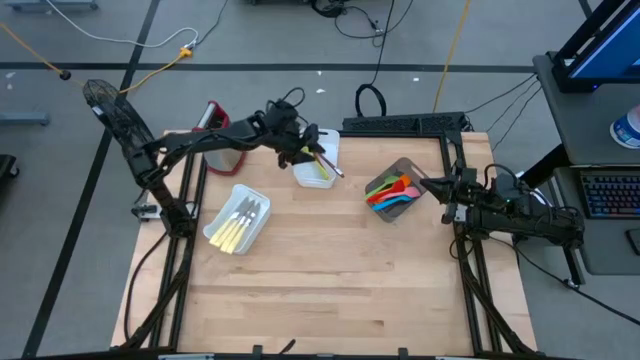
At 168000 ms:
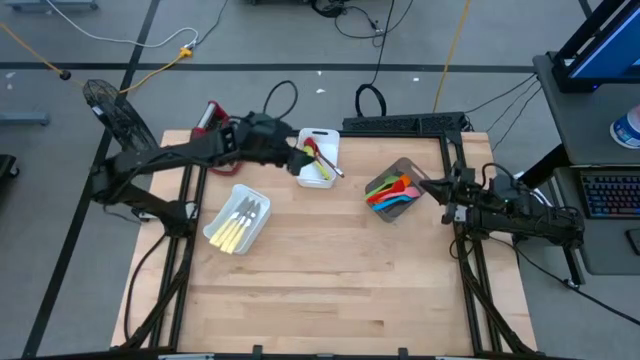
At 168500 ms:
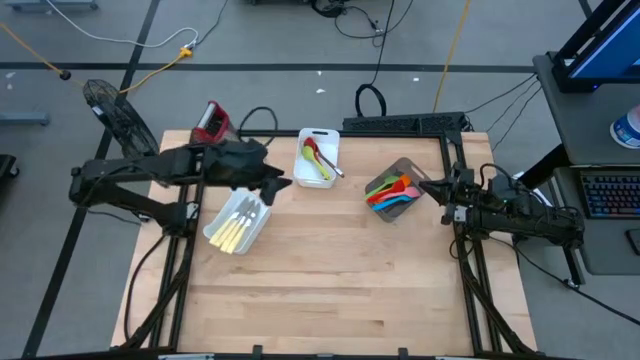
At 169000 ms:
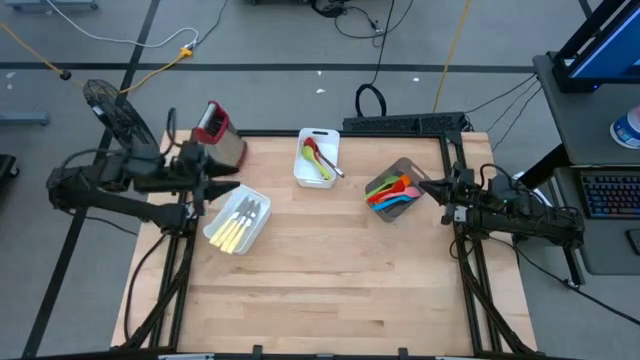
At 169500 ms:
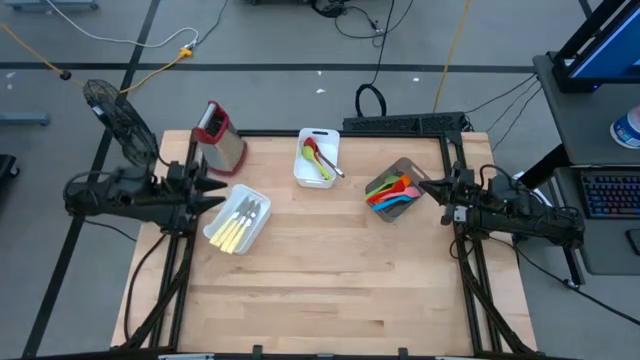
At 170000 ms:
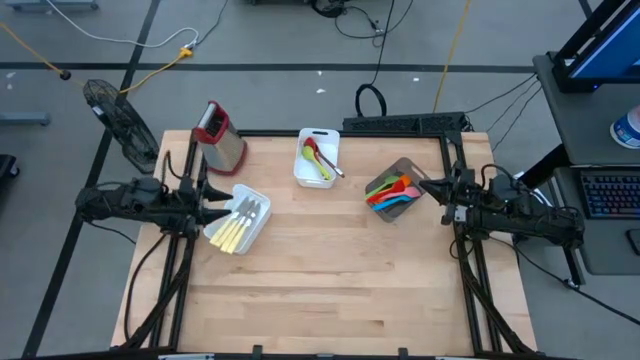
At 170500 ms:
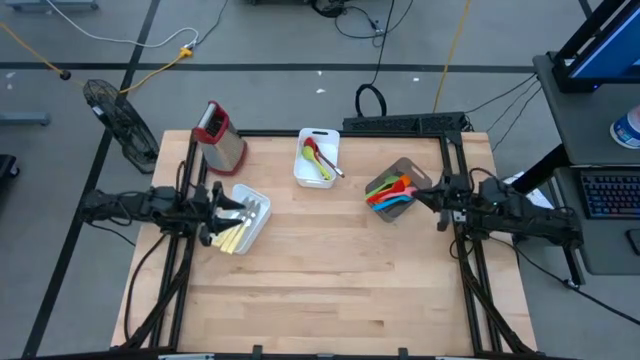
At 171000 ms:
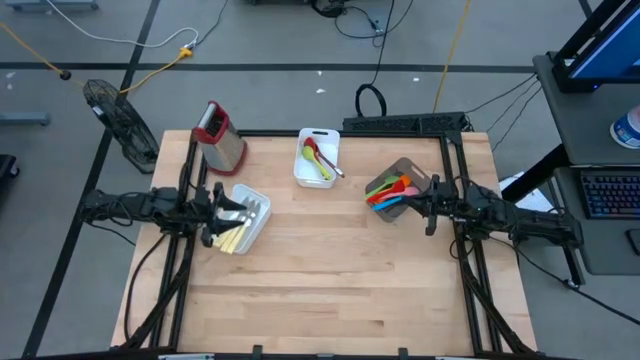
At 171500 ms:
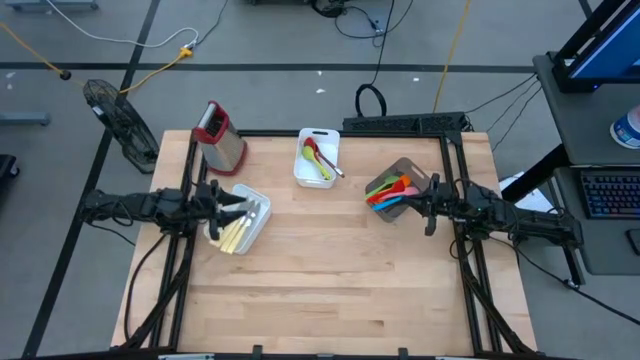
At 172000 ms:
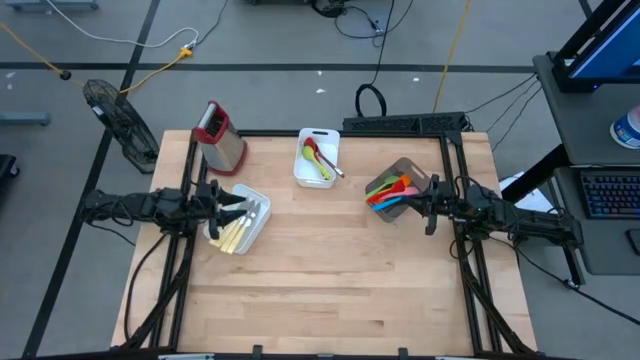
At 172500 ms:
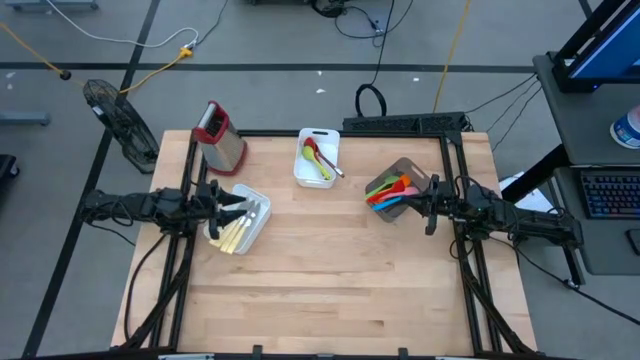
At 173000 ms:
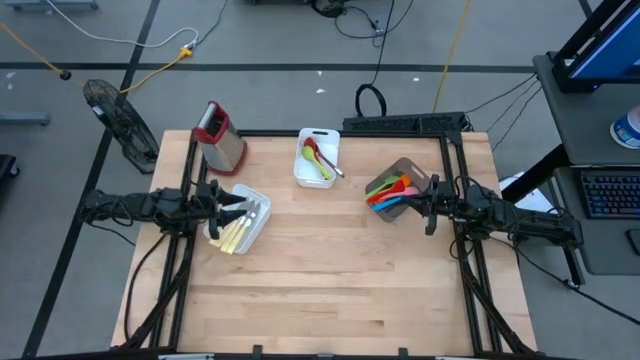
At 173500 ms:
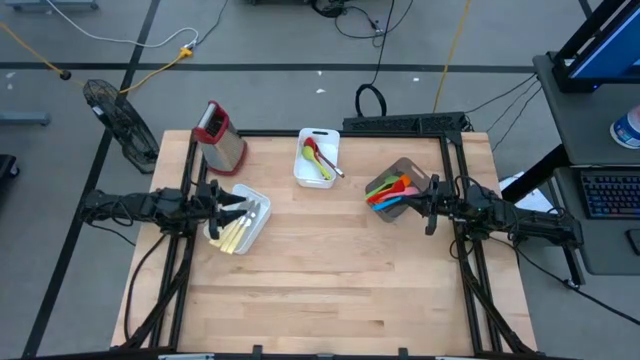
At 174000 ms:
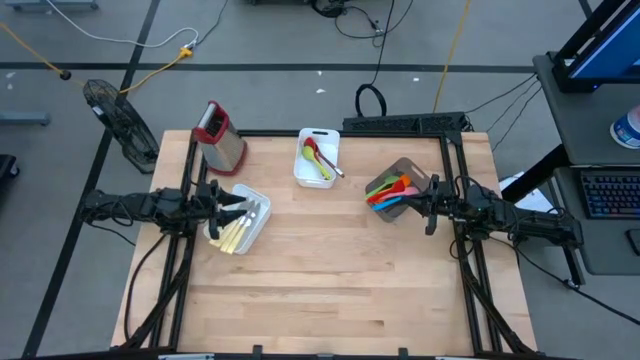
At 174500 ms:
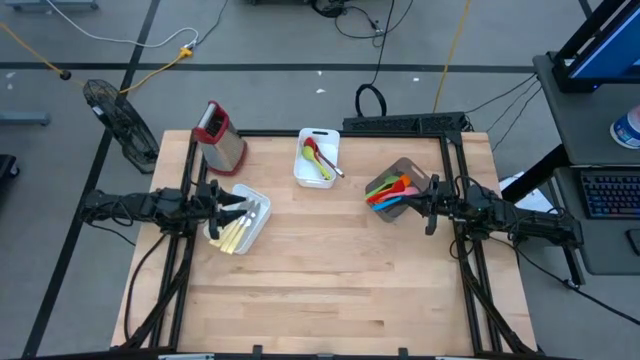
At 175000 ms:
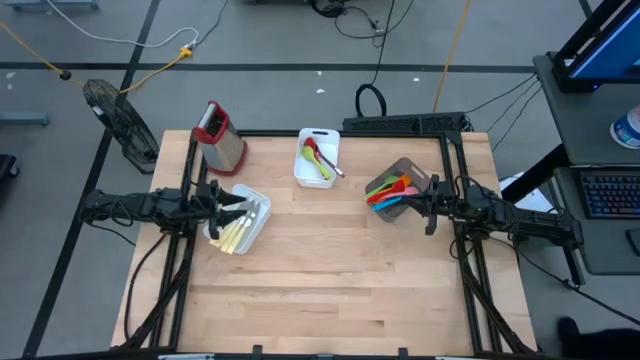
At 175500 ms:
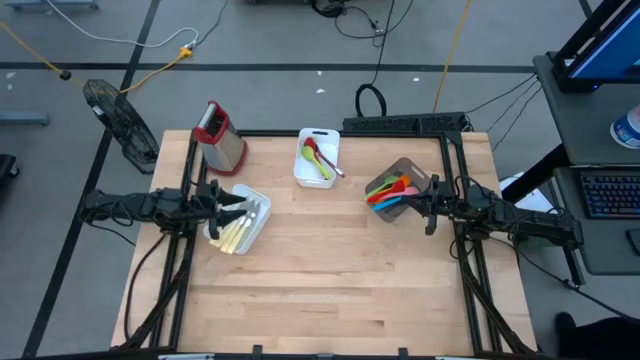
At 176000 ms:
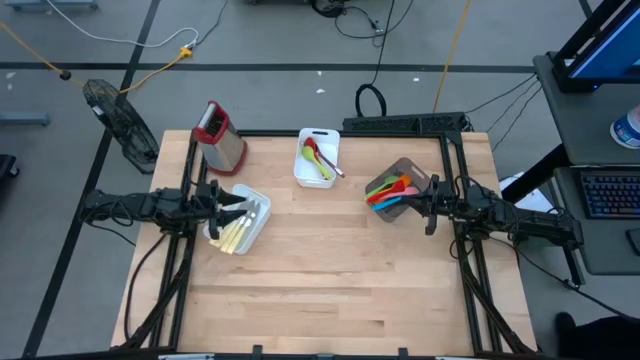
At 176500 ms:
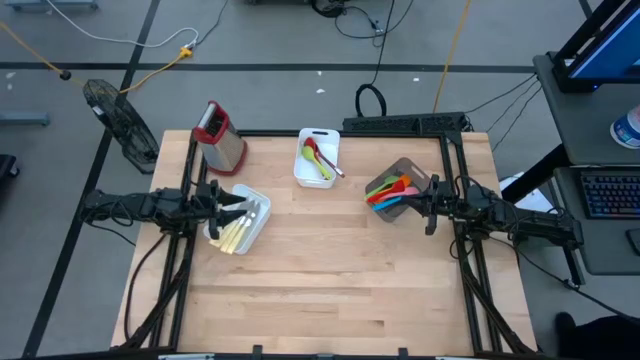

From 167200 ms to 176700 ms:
Task: Pick & Place Kitchen Items
Return to Home Position

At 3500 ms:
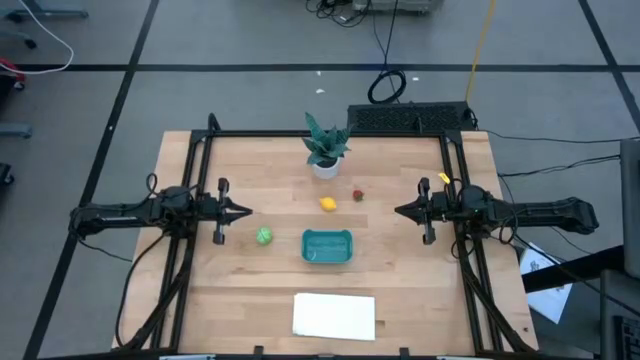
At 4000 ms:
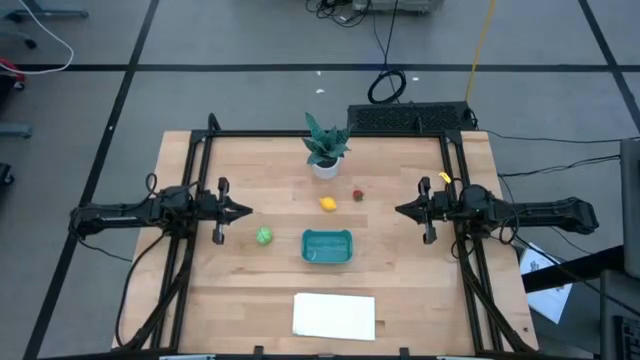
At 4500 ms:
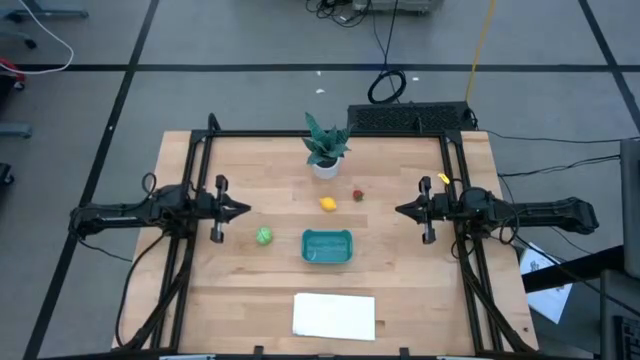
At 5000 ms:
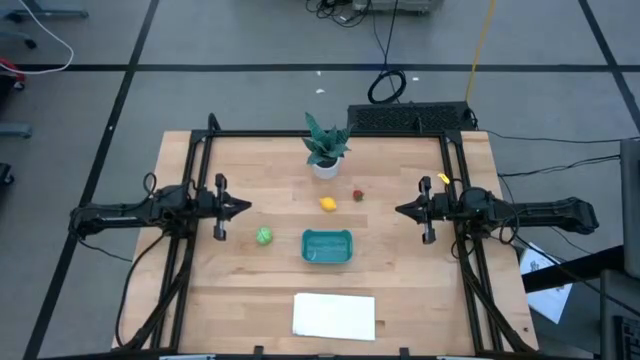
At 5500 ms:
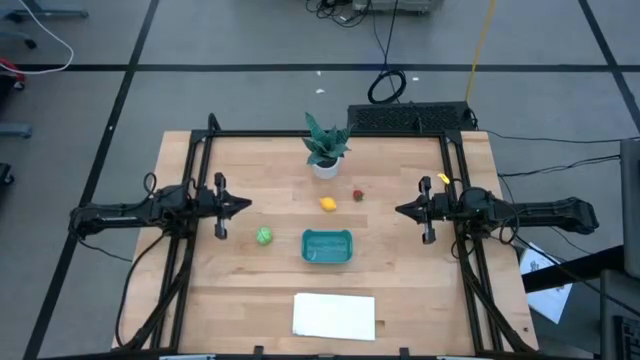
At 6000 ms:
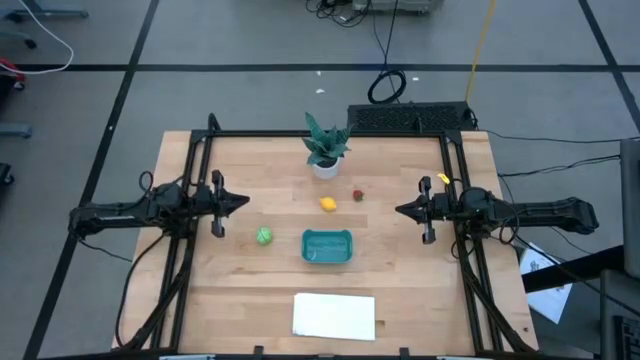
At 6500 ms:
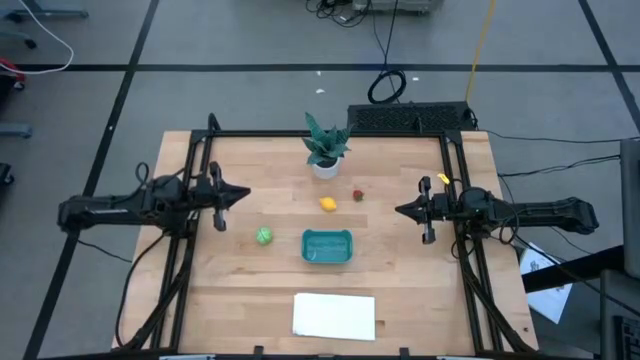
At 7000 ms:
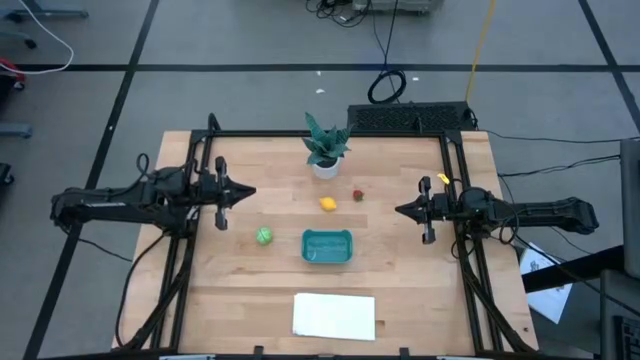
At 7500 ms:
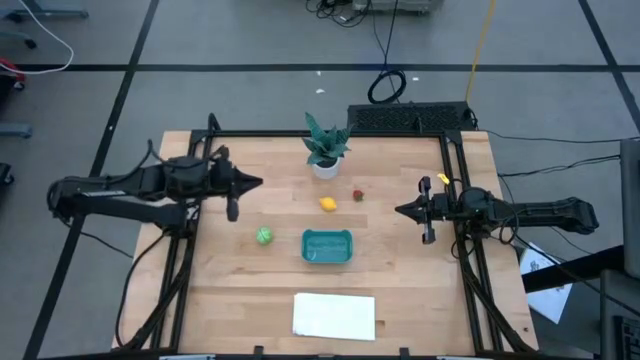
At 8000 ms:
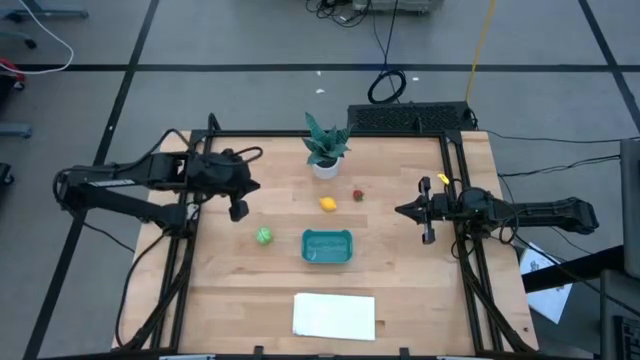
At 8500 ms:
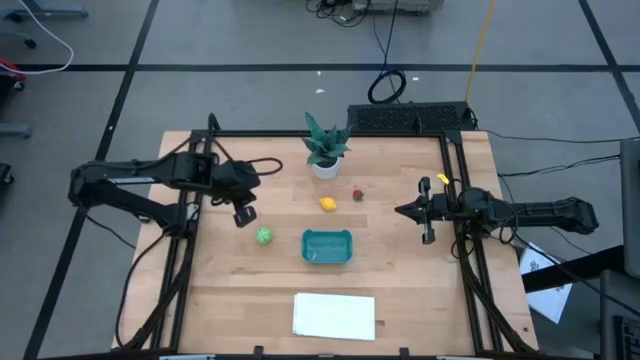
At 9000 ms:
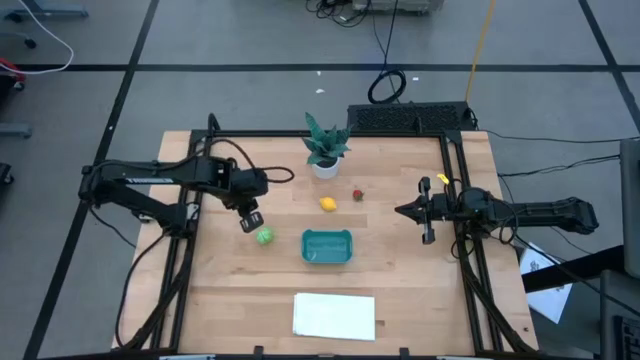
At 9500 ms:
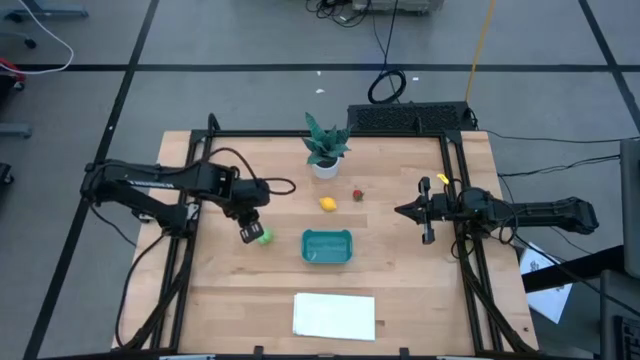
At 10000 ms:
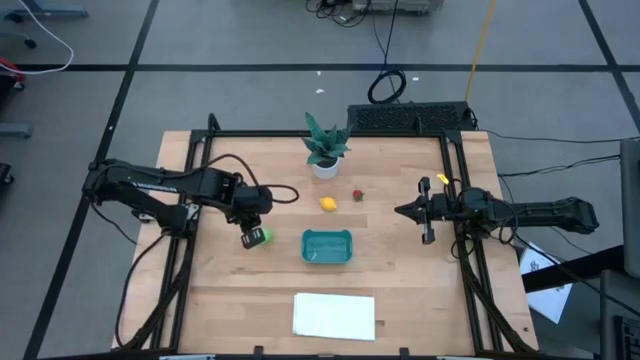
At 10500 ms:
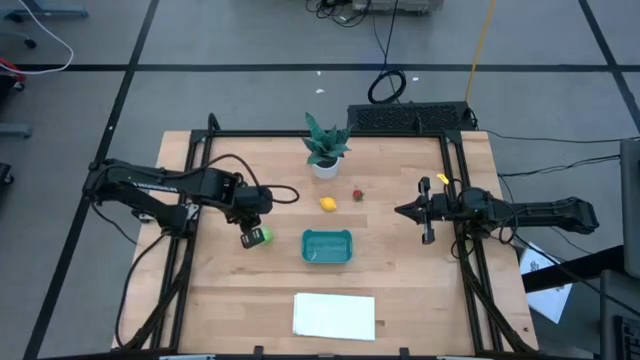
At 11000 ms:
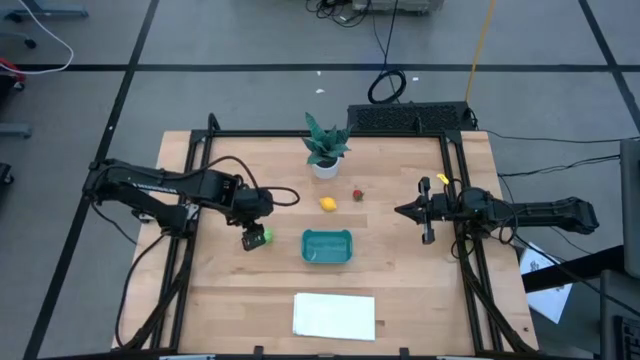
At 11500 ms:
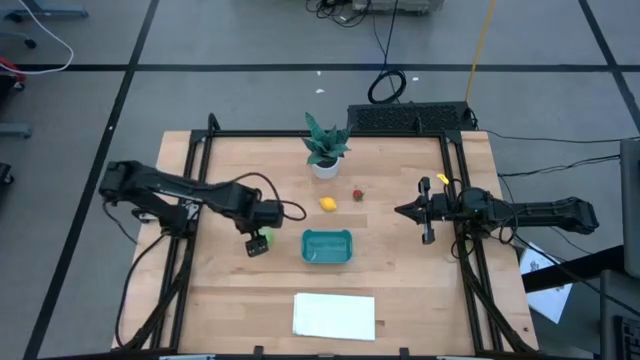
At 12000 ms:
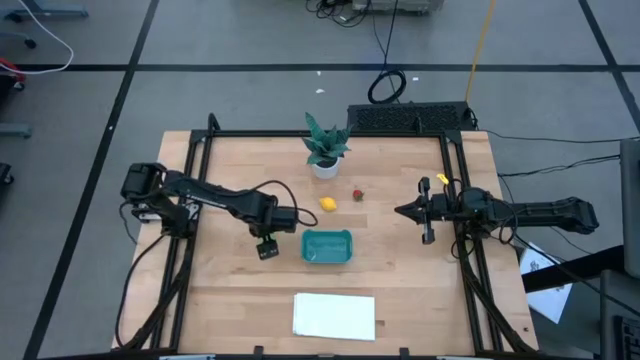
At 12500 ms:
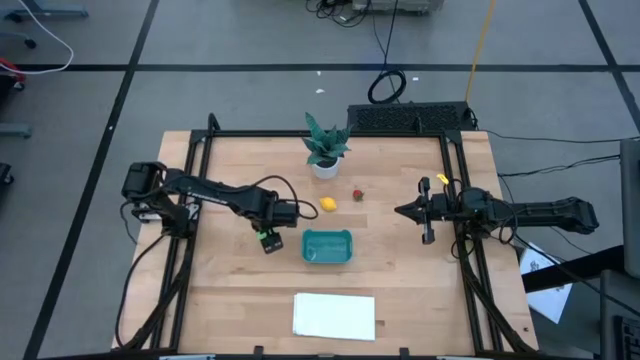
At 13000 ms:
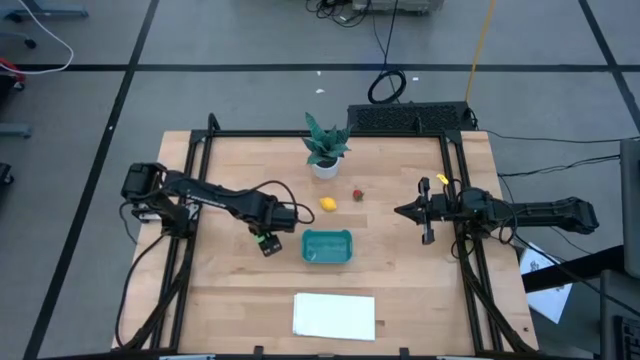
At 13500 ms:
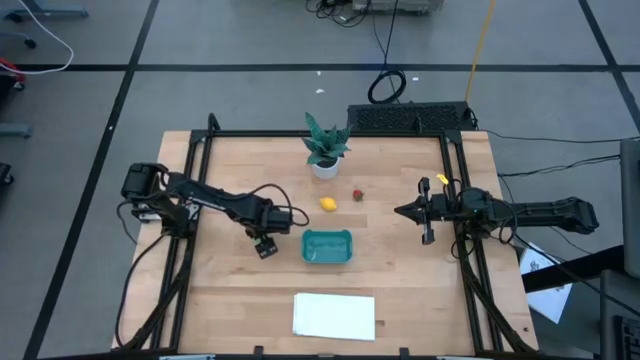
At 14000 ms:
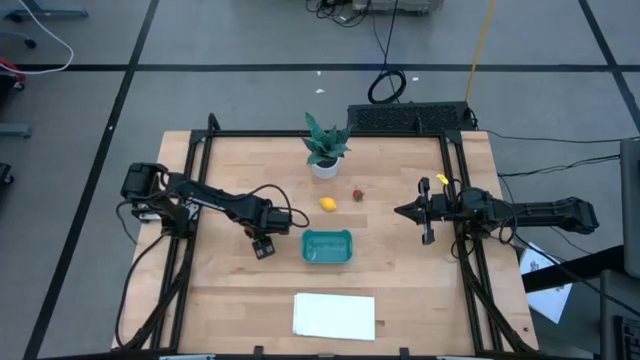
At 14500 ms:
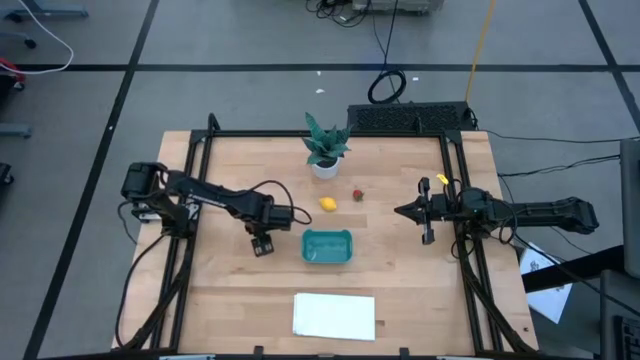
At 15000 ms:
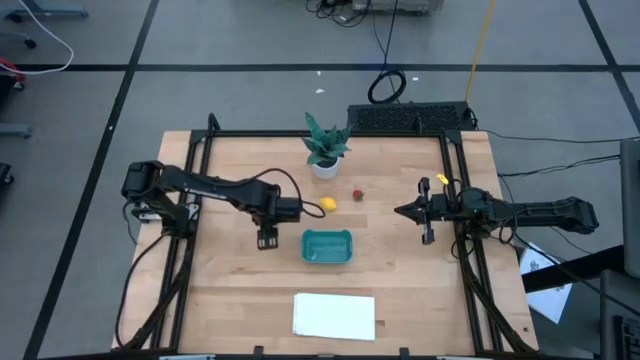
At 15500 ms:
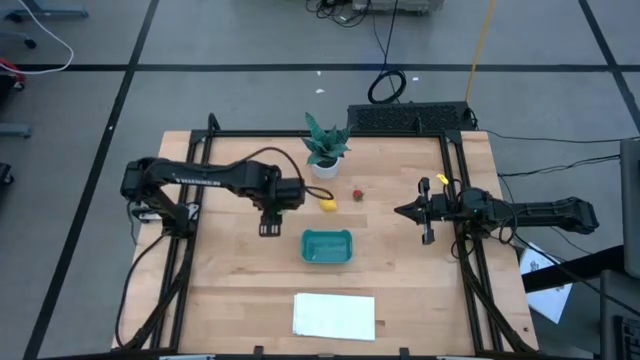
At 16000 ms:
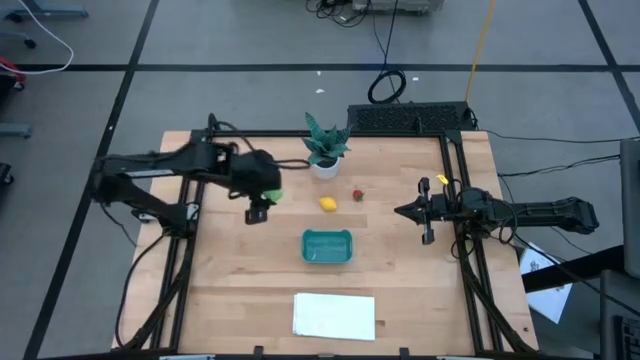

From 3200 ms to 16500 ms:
Task: Pick and placing Produce into tupperware
Put the green cabbage into the green bin
